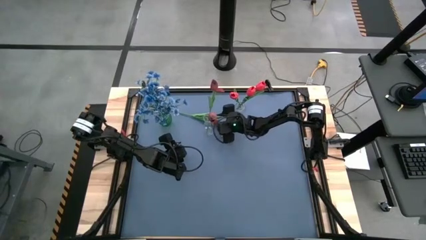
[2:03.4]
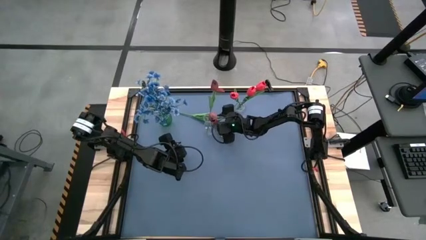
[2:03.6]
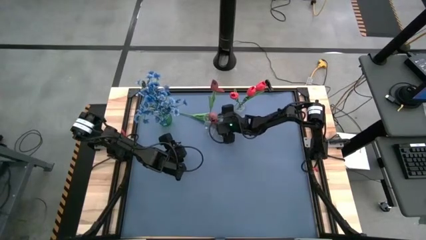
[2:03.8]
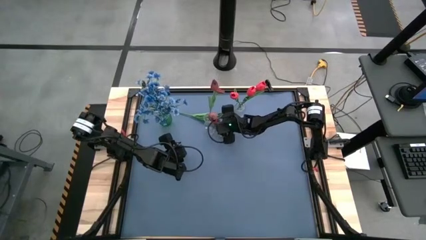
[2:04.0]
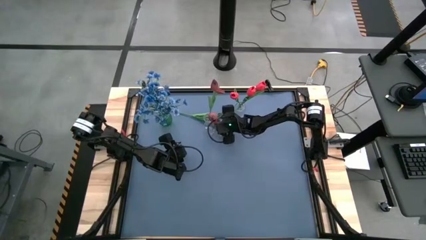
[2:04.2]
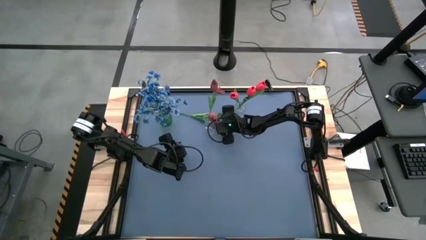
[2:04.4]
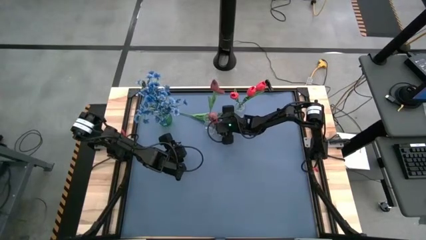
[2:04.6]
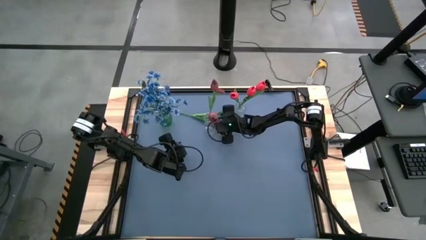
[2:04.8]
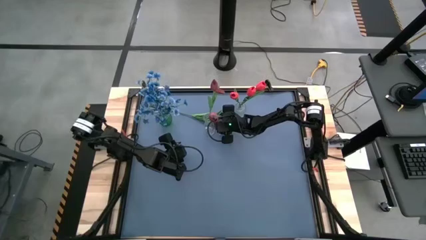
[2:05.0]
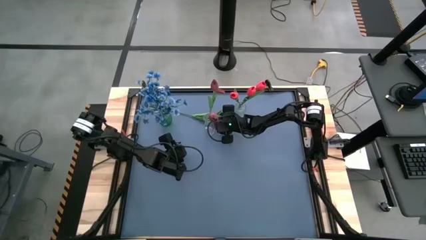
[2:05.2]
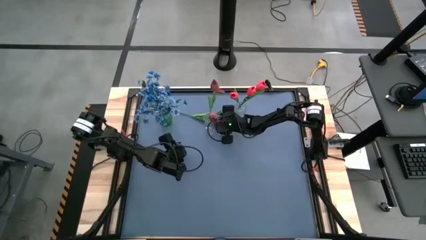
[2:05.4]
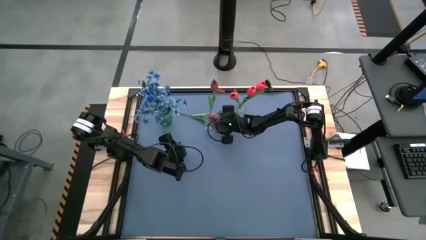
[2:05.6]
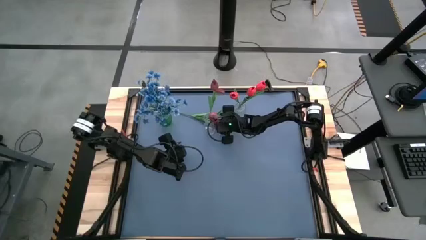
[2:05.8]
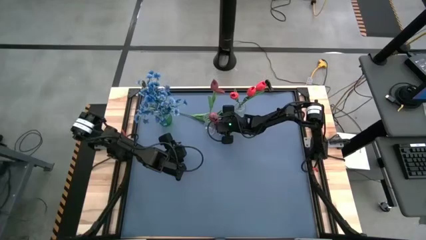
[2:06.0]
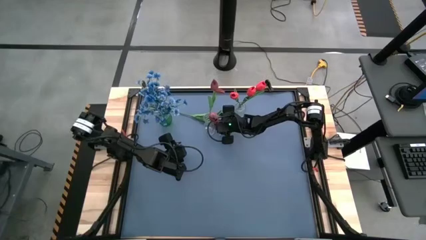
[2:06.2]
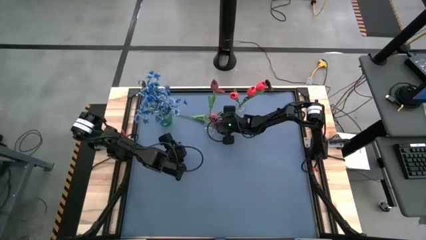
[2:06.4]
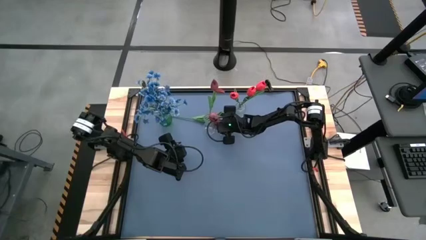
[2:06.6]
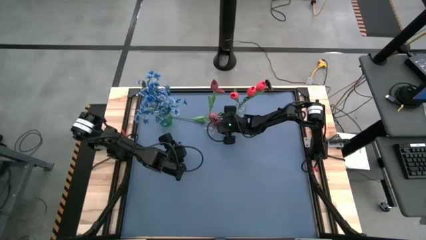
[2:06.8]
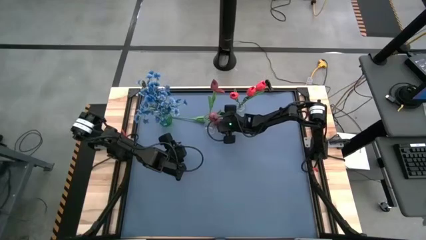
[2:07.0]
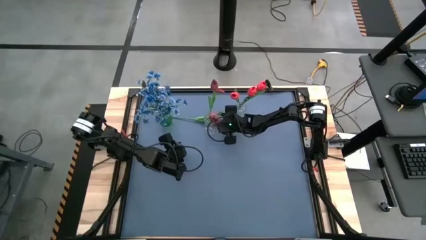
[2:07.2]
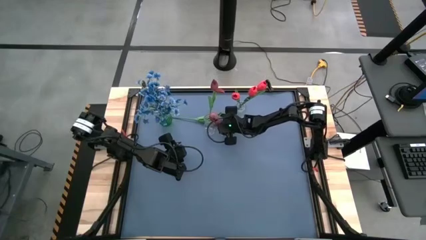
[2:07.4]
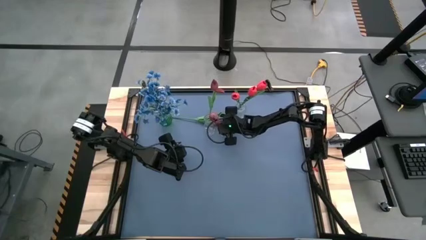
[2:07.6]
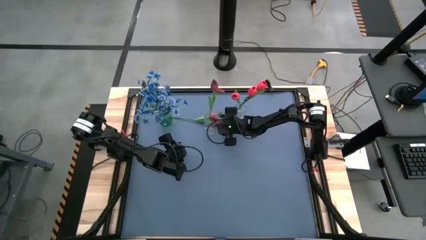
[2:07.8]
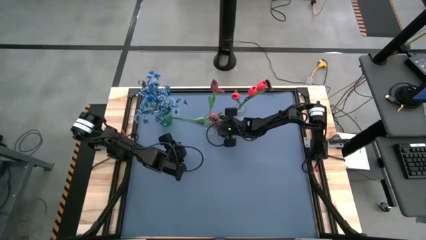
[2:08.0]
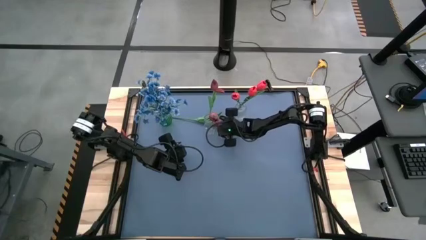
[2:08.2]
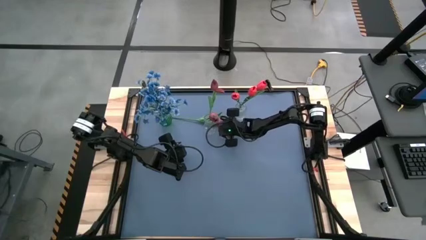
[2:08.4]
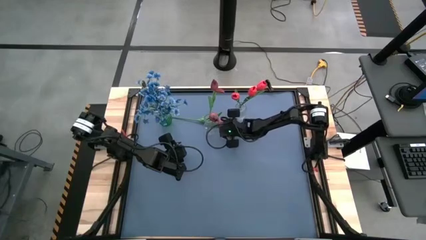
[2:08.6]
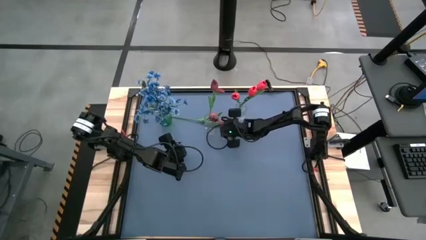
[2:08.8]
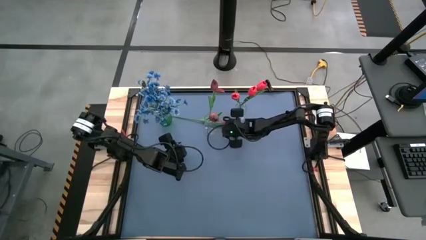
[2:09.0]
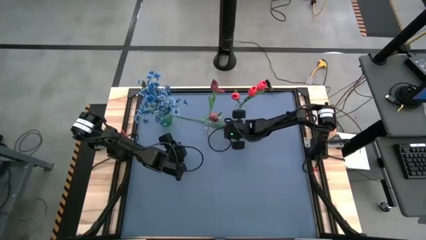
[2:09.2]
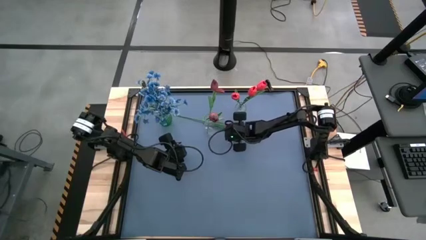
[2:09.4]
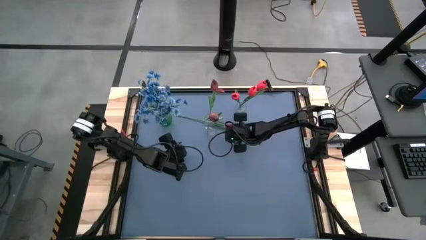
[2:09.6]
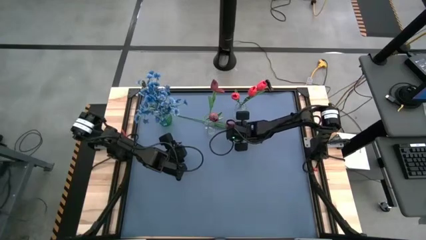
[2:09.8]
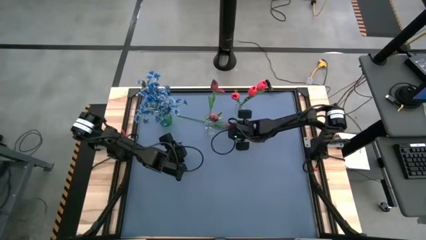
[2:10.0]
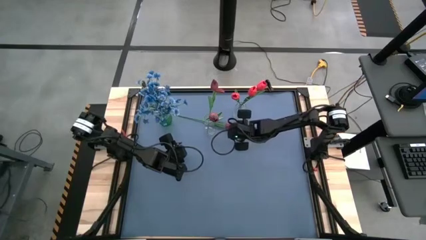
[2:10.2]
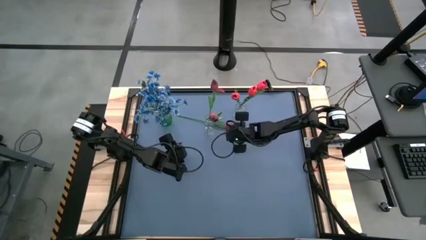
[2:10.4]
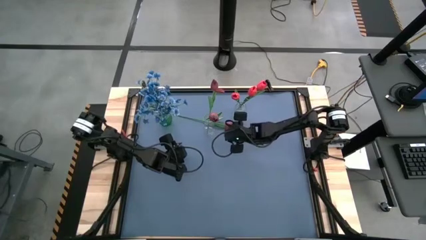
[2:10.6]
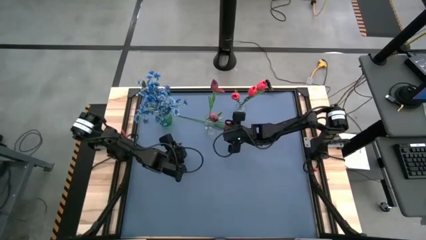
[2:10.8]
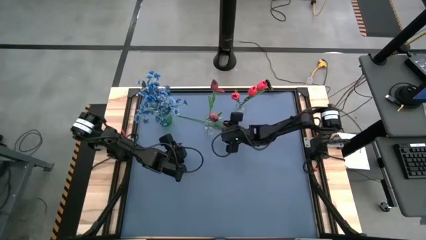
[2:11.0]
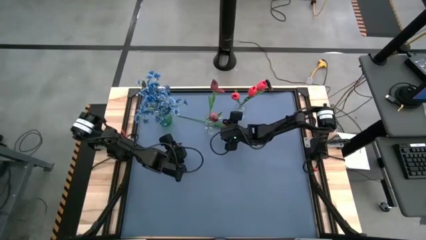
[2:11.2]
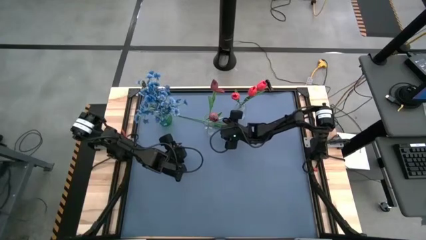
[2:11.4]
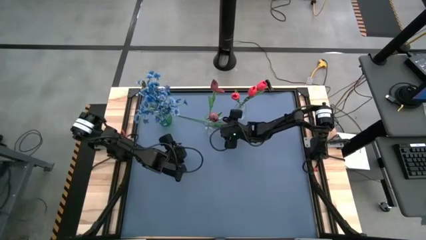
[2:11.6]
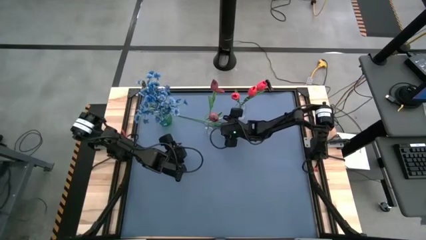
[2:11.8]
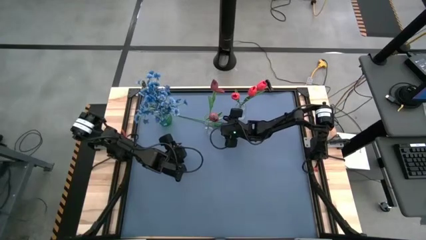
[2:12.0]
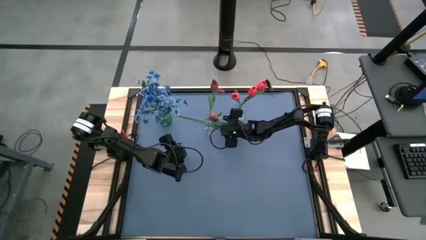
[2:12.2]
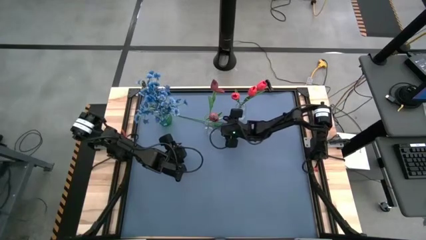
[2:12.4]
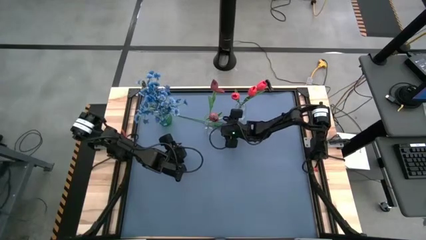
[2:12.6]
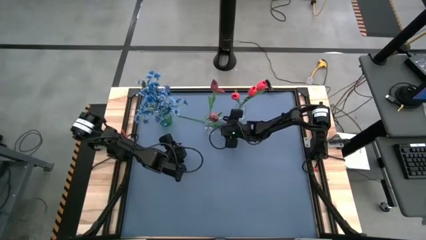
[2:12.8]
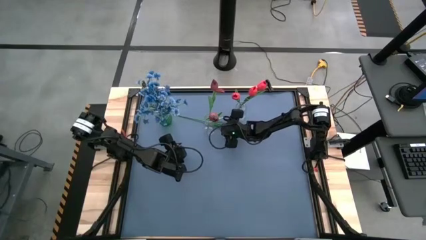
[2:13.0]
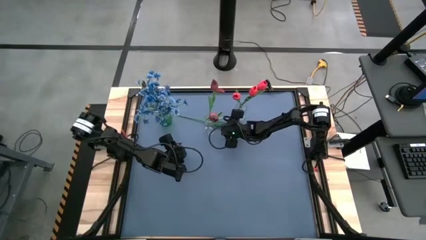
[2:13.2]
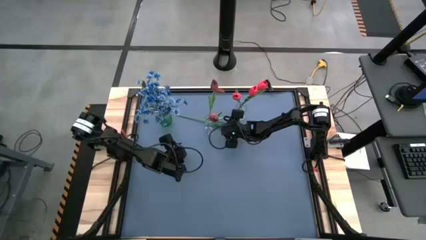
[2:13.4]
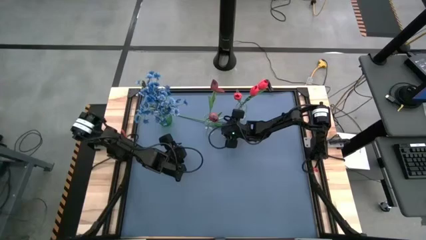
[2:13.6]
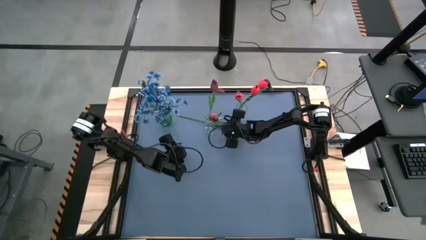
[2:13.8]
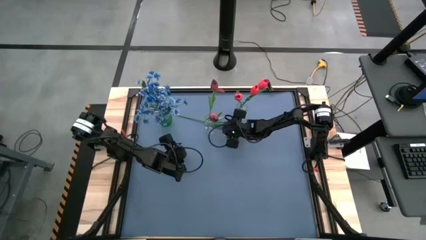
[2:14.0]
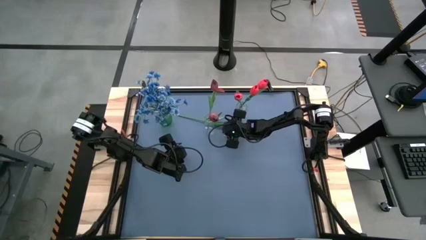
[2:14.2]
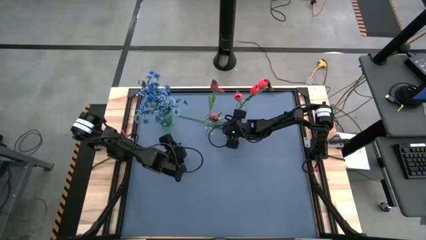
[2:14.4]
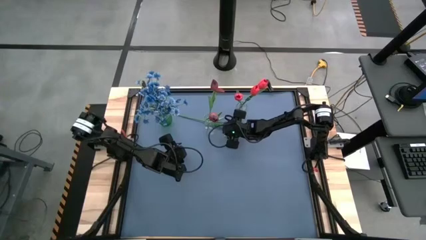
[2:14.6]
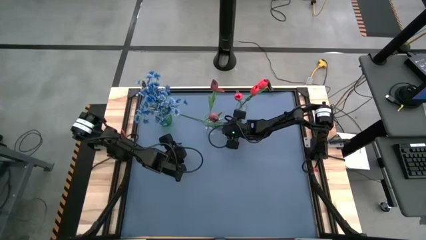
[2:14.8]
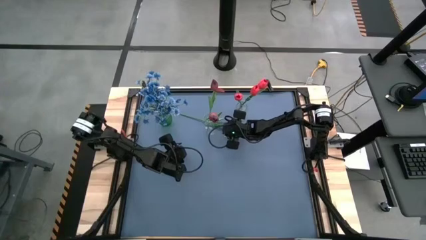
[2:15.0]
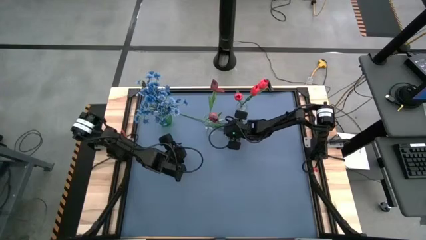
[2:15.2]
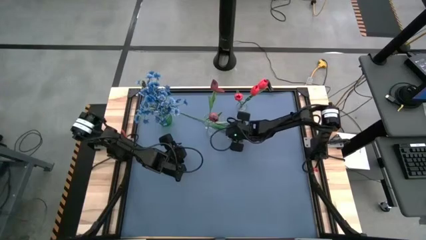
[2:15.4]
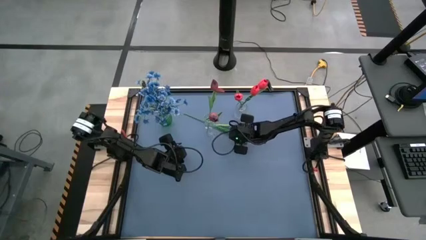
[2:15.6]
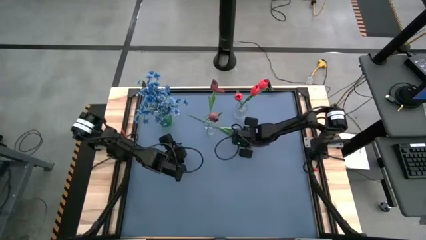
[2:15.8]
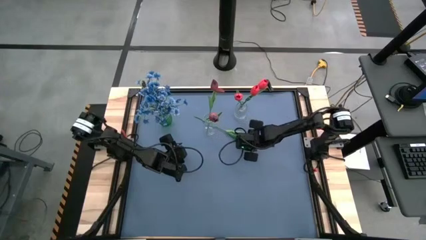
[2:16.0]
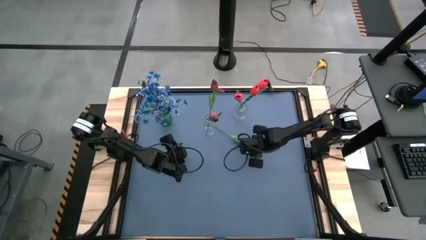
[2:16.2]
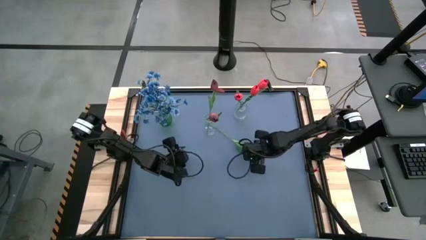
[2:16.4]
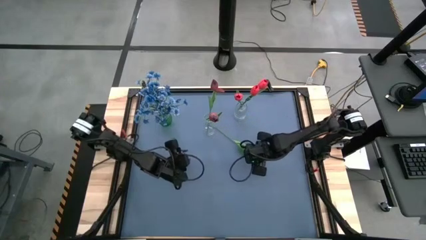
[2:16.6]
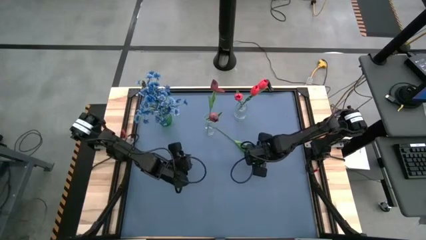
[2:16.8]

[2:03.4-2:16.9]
Task: Sort flowers into vase by color
Put the dark red tulip into the bottom transparent vase
